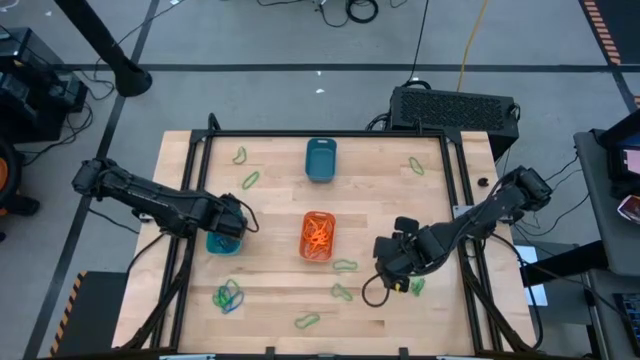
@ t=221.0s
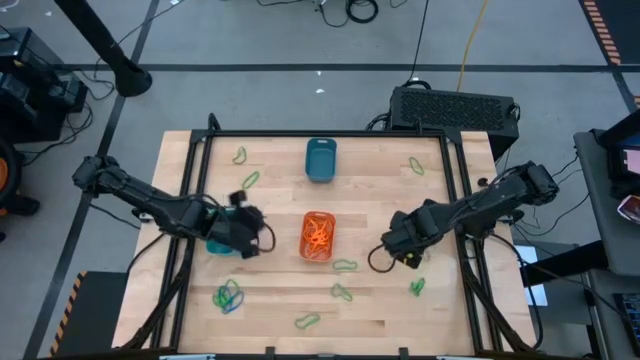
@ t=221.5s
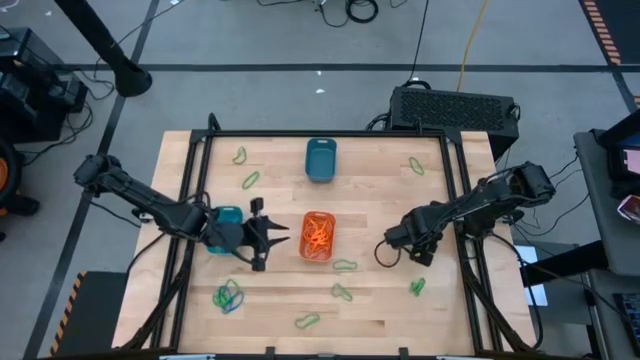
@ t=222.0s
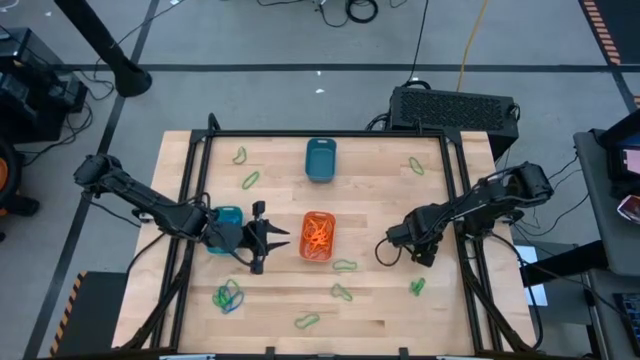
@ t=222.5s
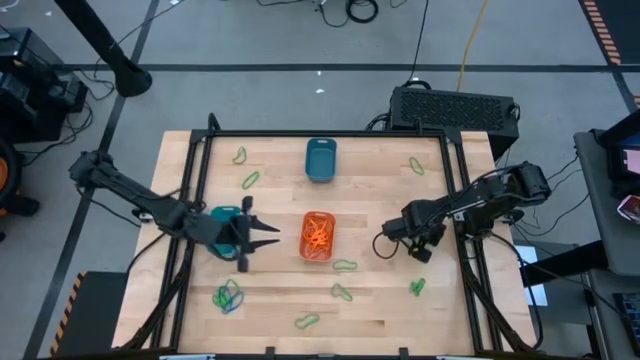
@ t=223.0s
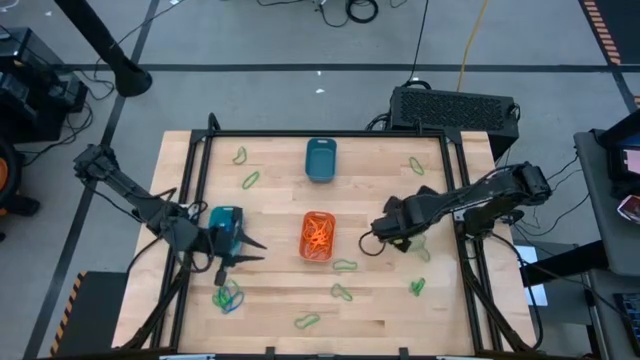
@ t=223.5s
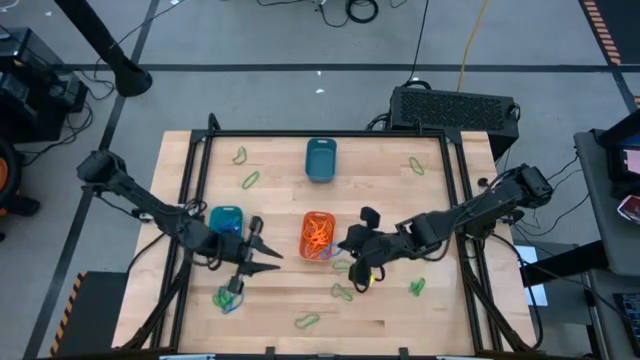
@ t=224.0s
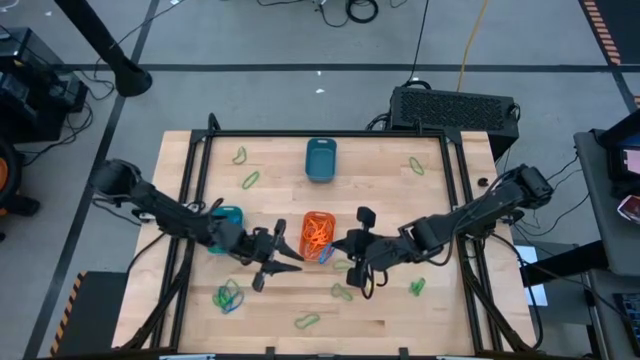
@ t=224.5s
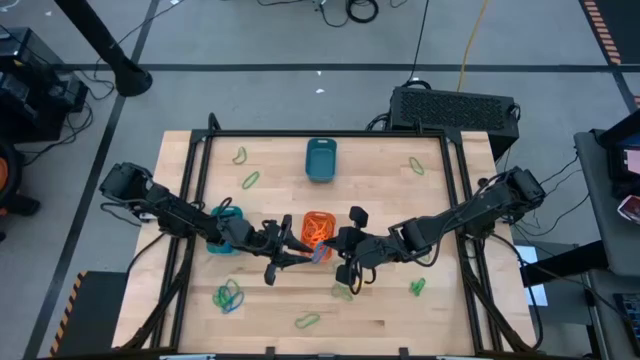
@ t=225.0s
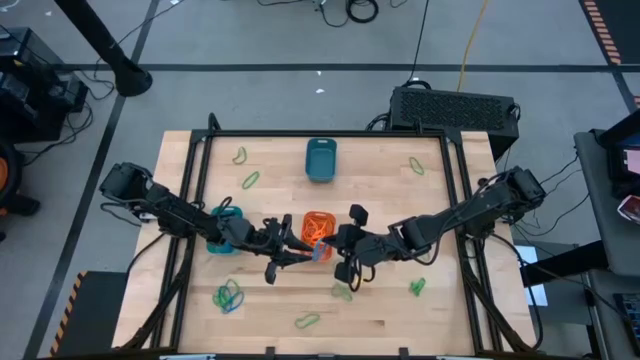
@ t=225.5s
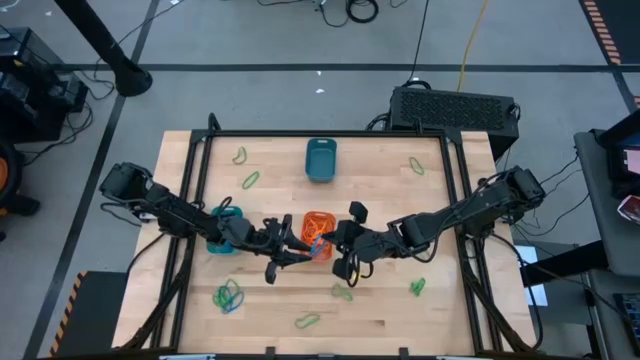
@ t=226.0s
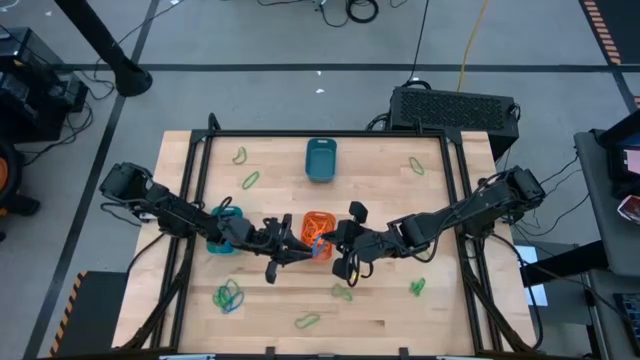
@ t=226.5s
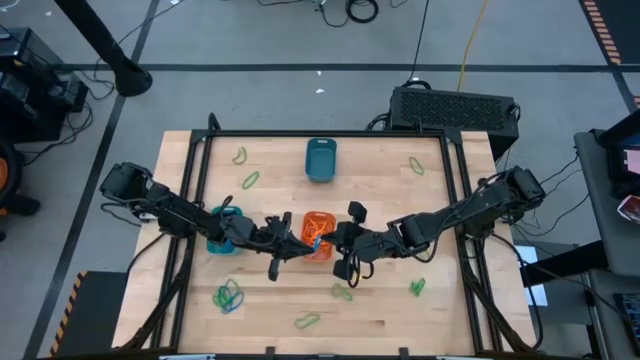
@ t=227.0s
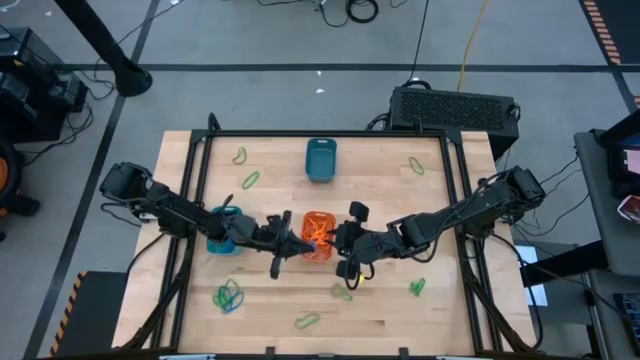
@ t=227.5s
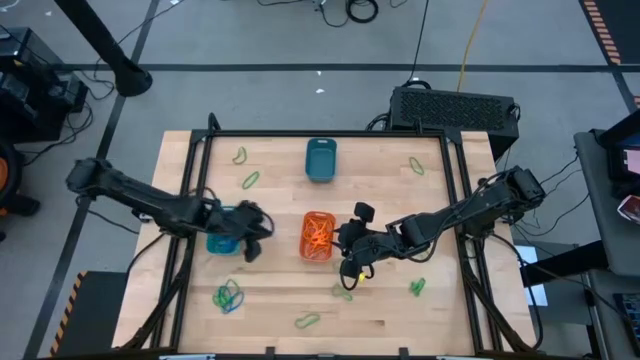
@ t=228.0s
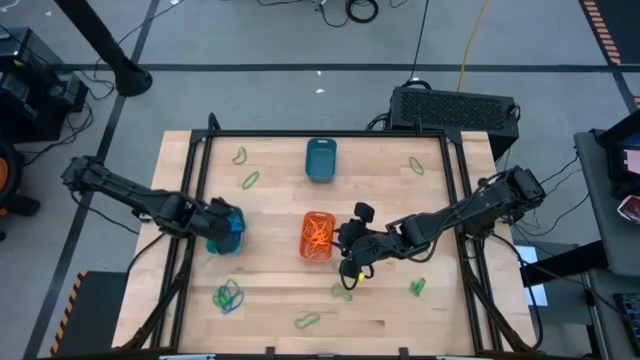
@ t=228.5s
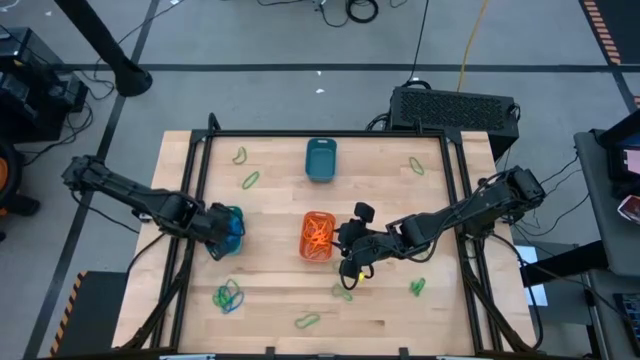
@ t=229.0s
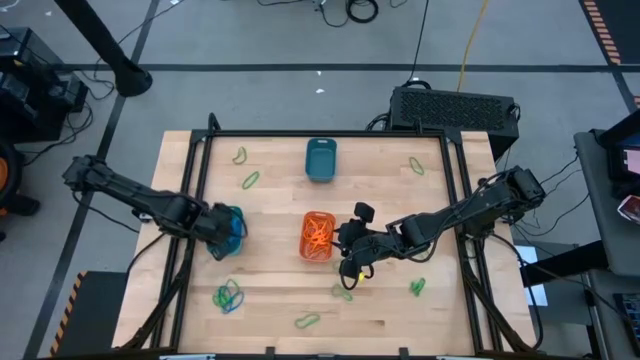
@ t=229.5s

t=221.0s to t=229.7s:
Task: Sort rubber bands into baskets
Put the blue rubber band into the green bin

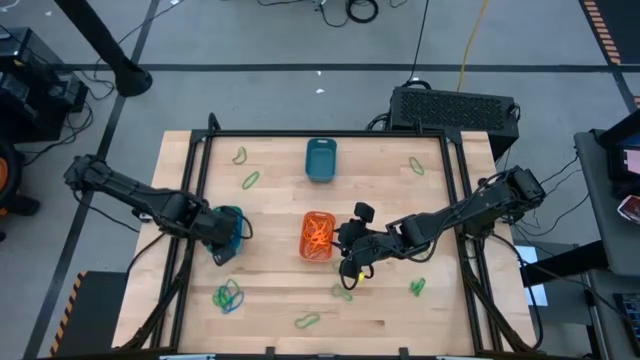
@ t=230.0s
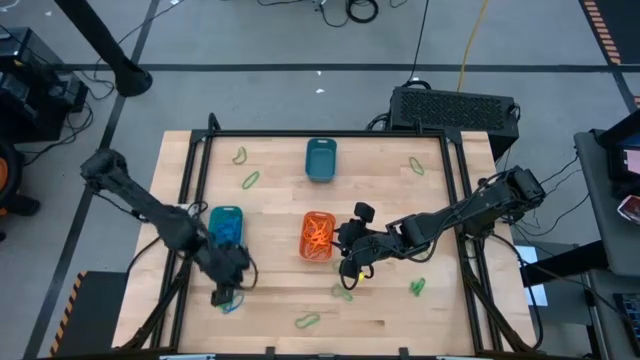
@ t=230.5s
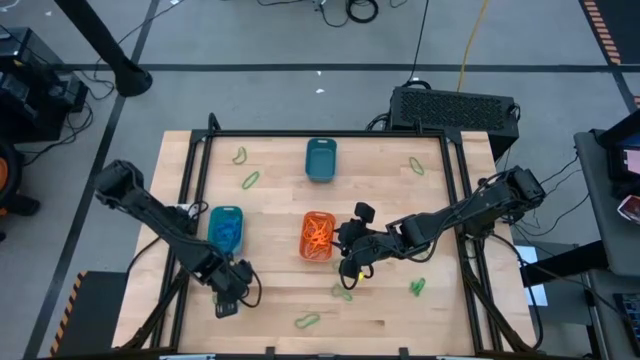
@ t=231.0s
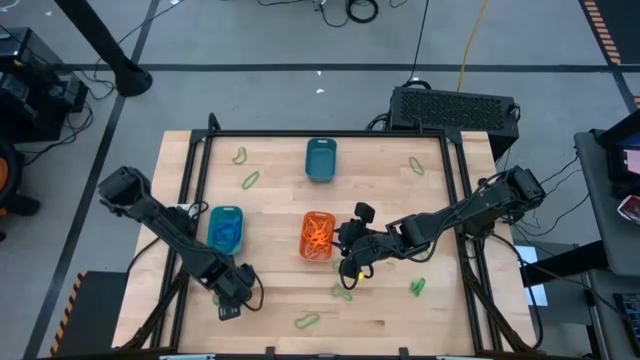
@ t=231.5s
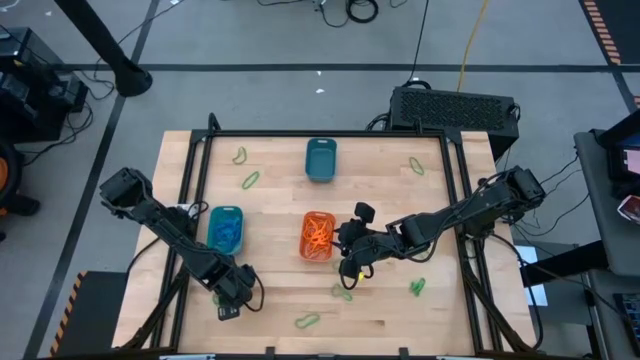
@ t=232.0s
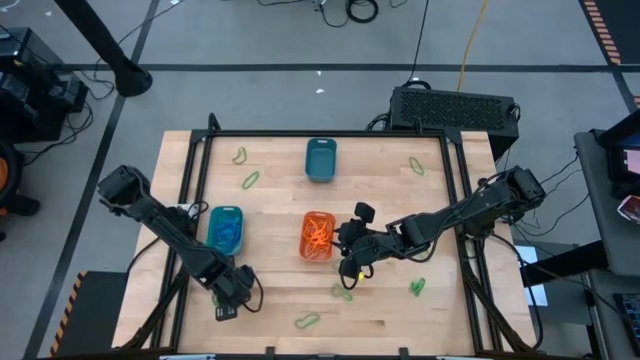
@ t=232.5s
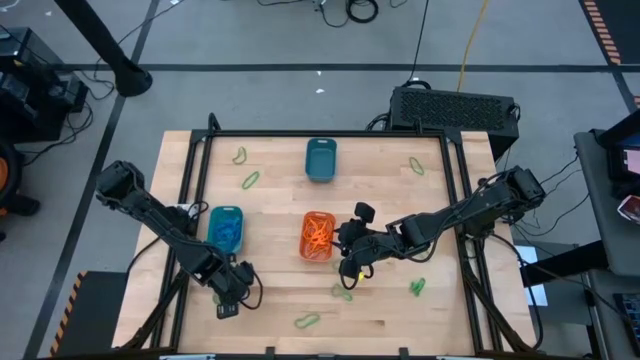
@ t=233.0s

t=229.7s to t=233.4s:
Put the blue rubber band into the green bin

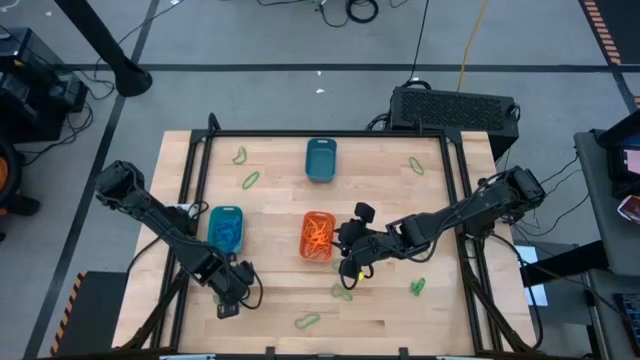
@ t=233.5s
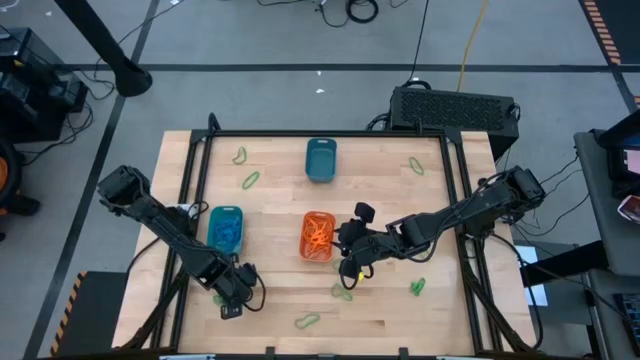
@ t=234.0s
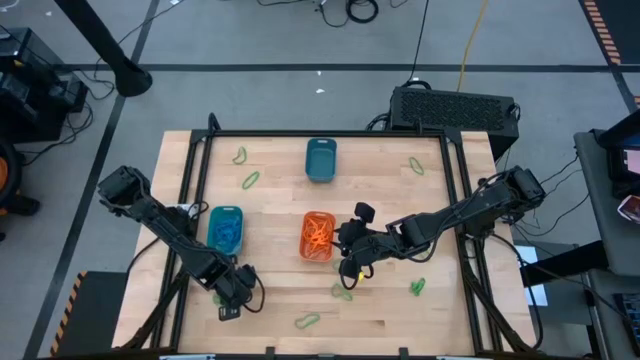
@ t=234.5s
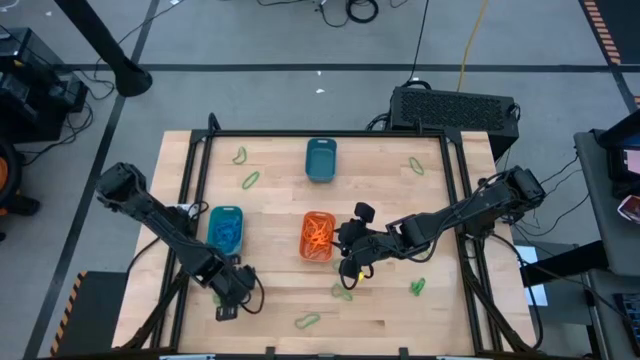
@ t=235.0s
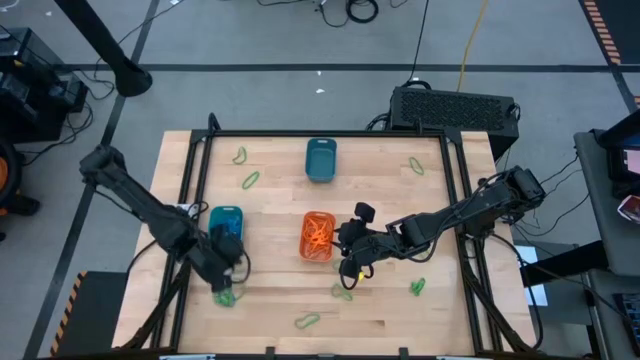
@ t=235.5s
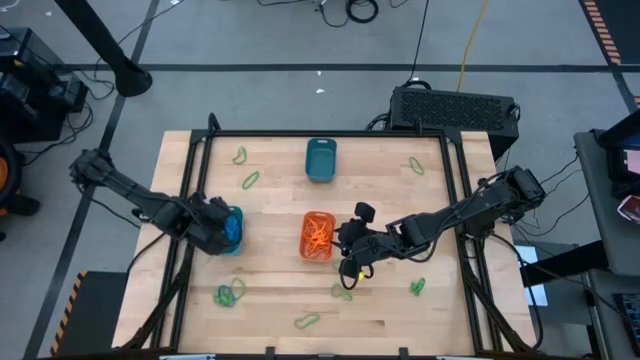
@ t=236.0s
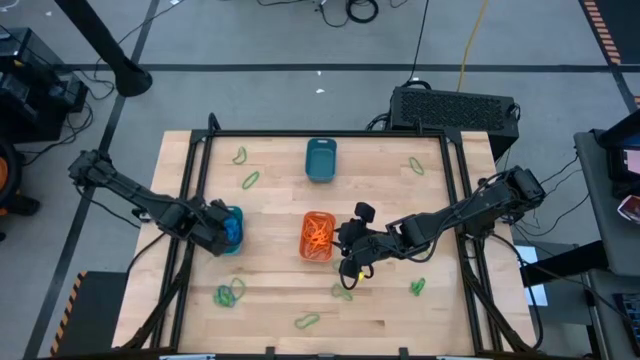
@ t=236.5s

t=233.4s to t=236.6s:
Put the blue rubber band into the green bin

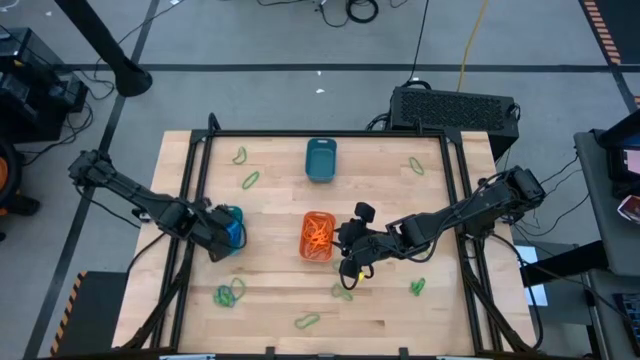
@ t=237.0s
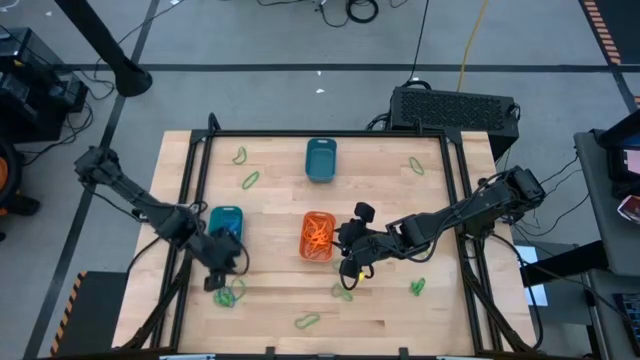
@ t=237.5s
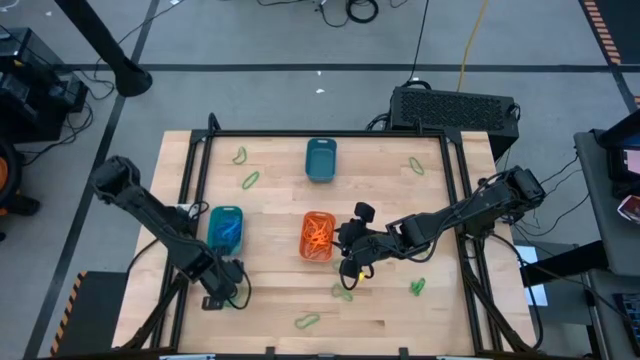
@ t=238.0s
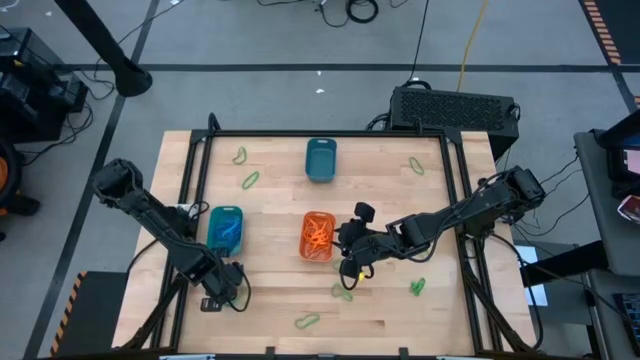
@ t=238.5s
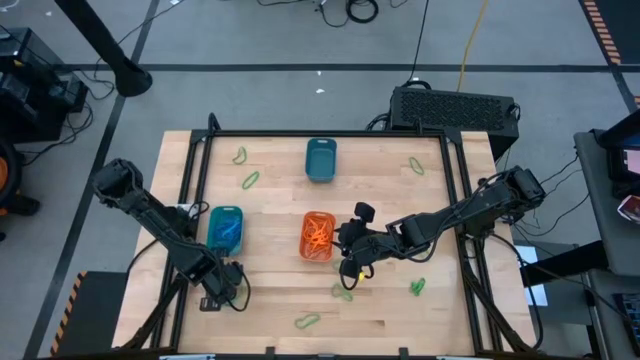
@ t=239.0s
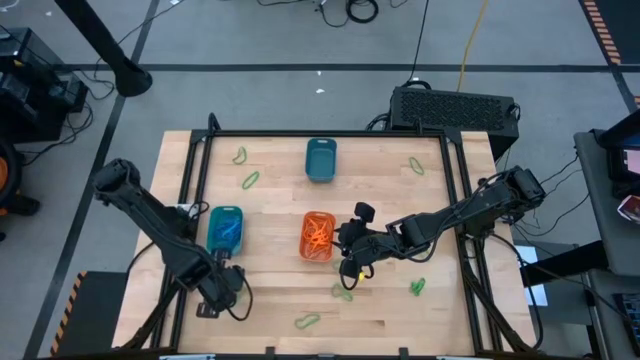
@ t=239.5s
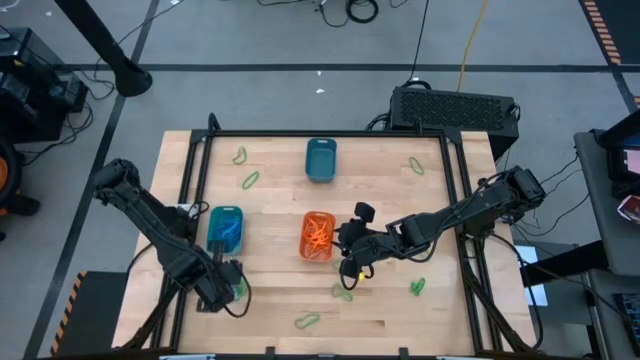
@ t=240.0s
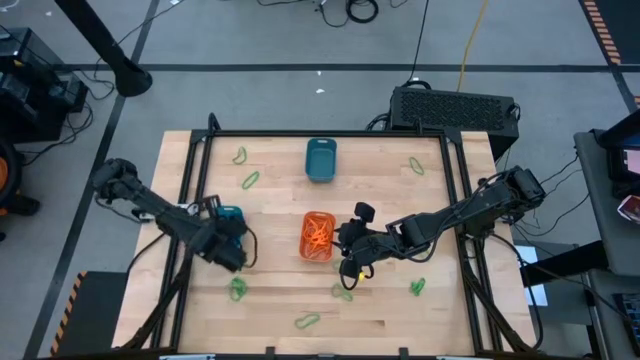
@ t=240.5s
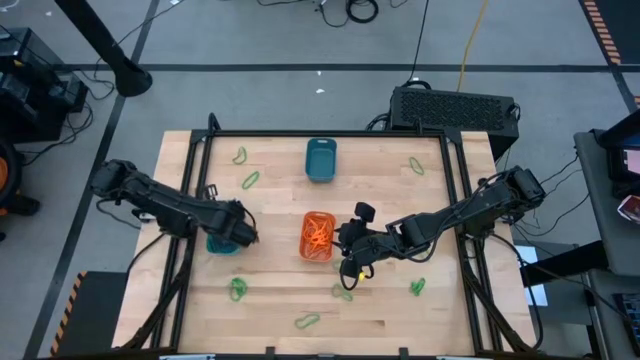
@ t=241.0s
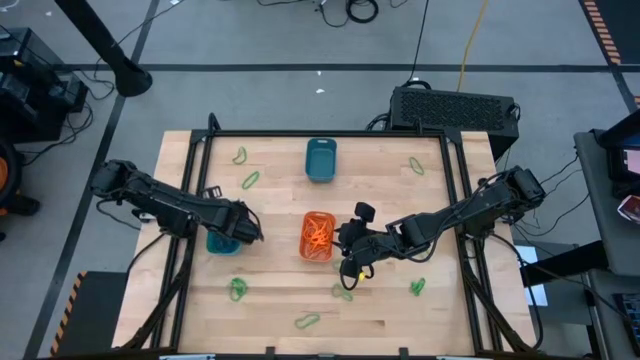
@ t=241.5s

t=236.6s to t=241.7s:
Put the blue rubber band into the green bin
